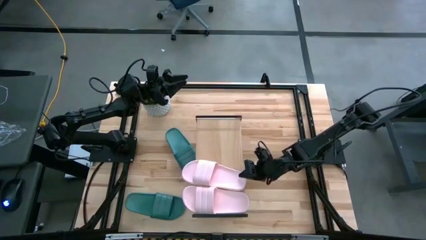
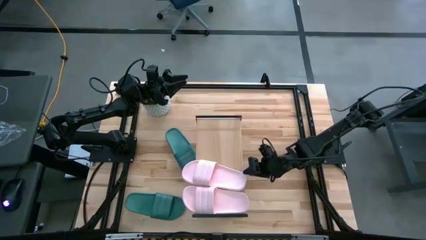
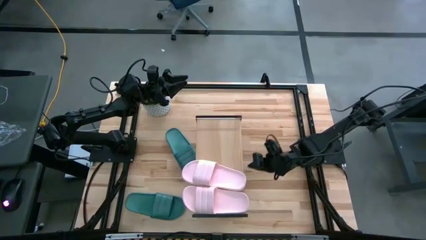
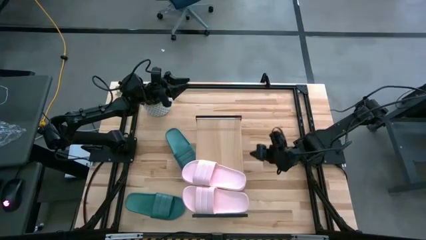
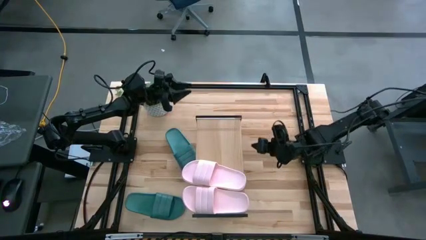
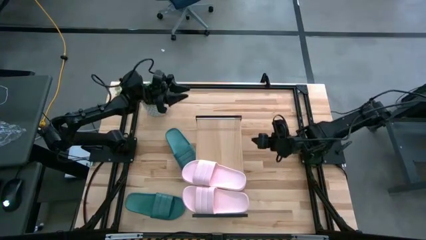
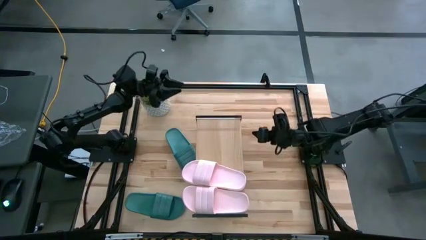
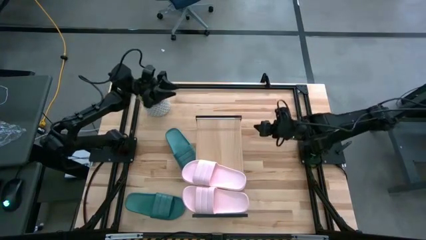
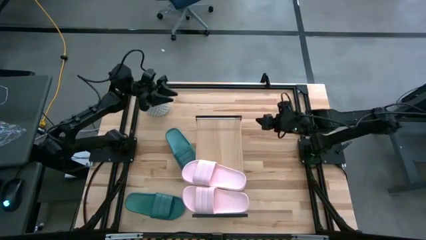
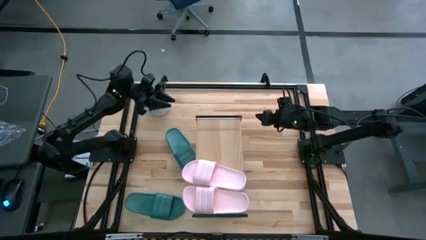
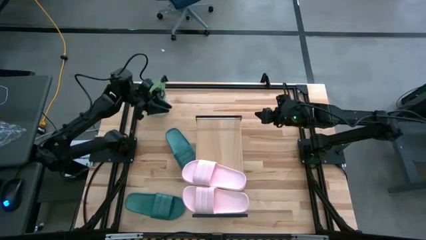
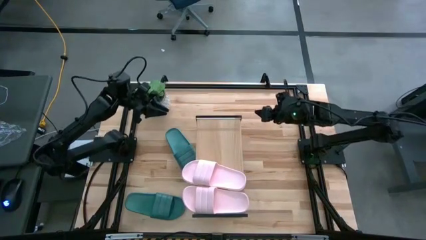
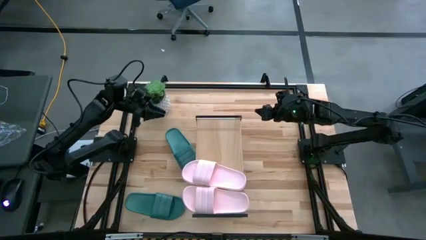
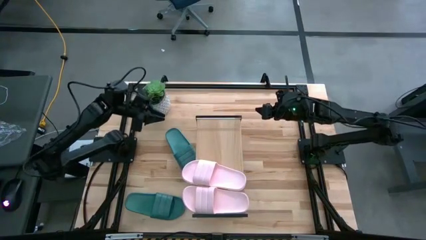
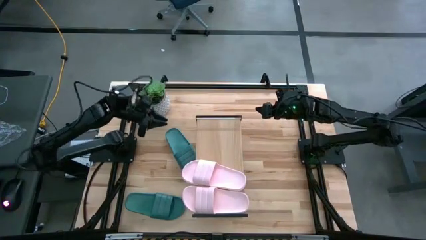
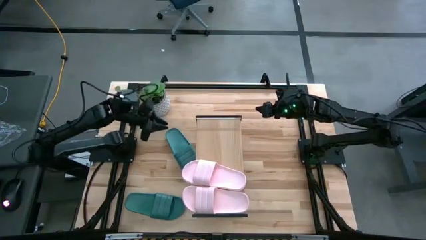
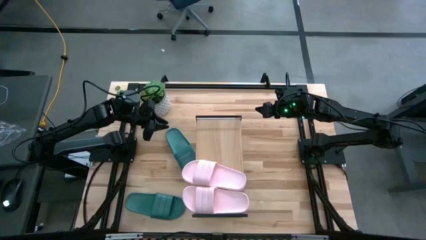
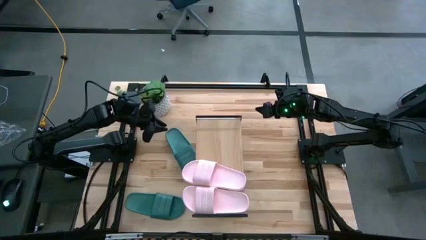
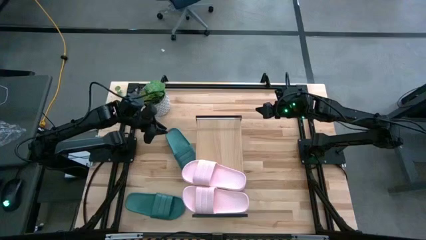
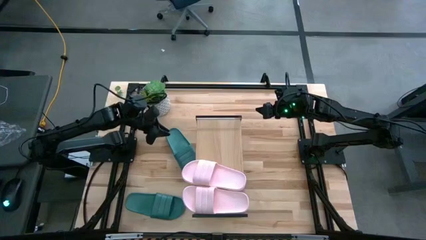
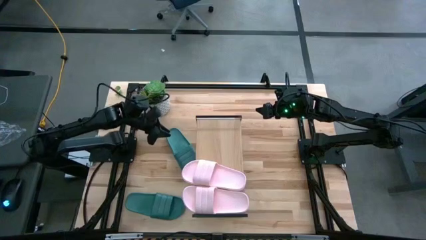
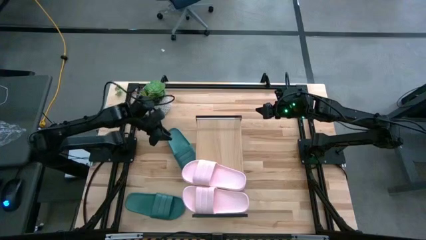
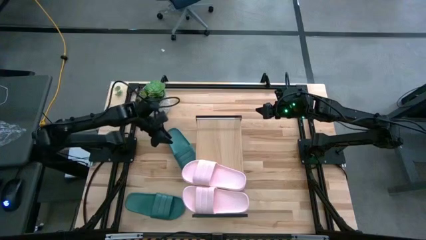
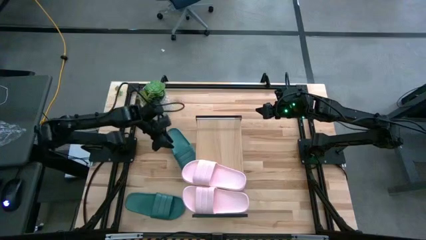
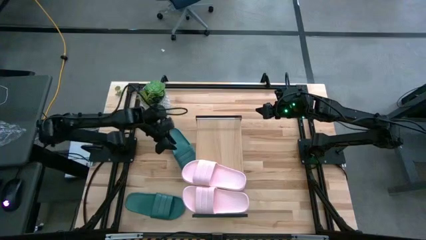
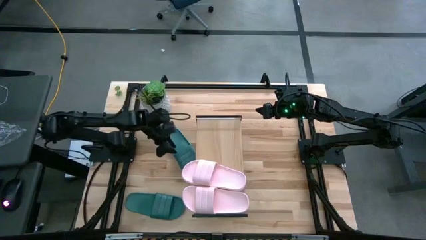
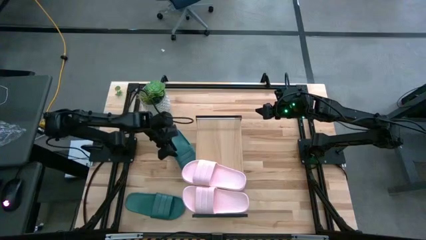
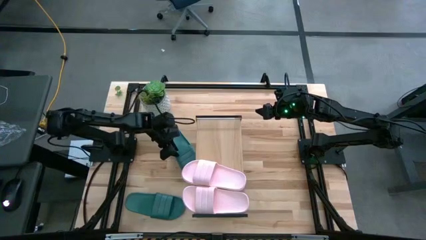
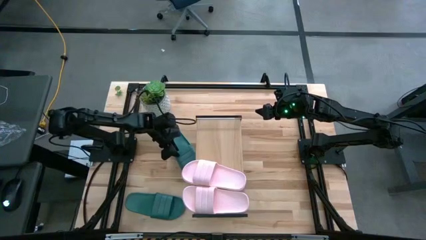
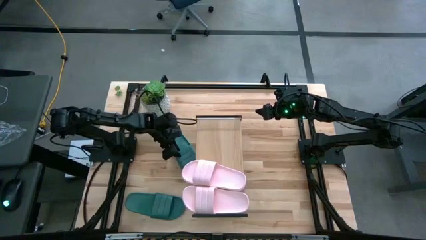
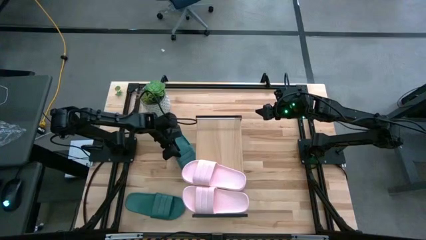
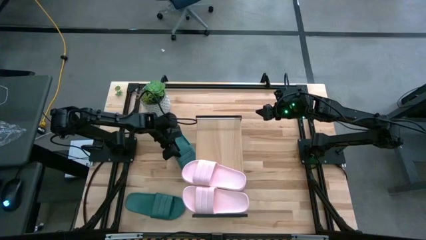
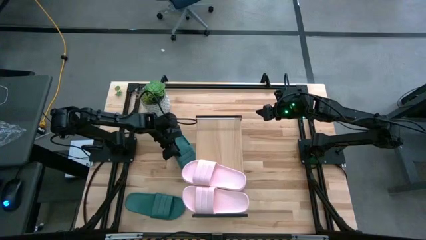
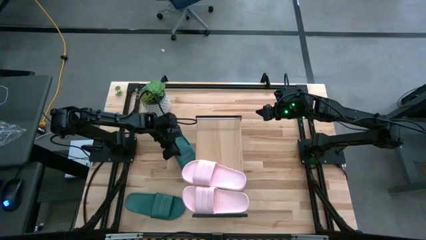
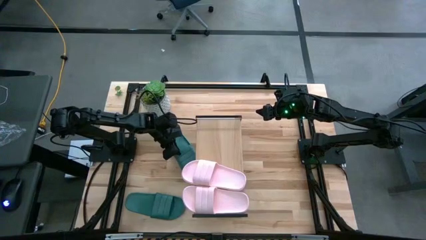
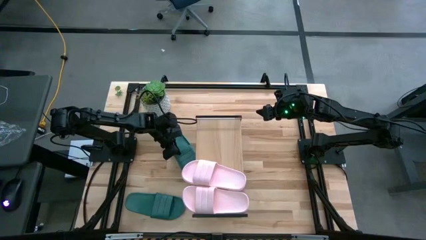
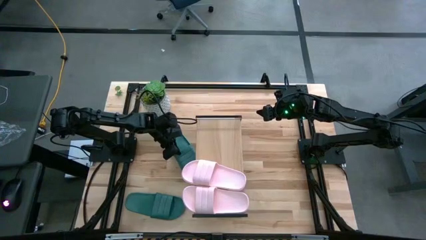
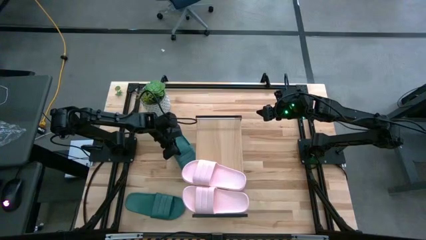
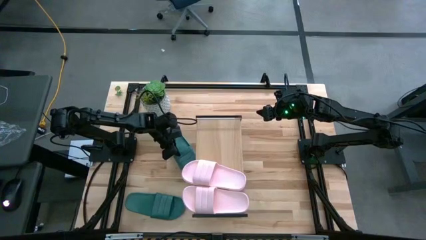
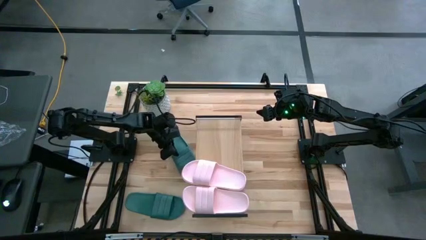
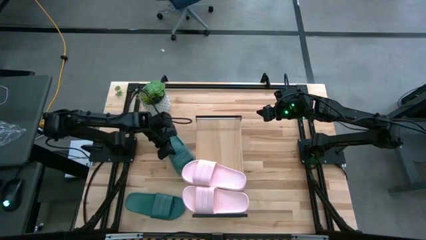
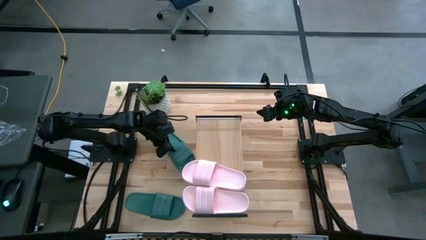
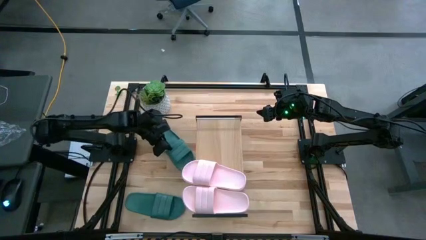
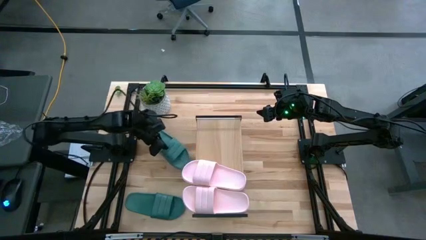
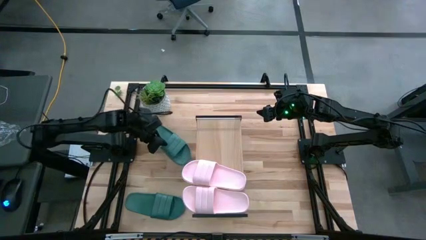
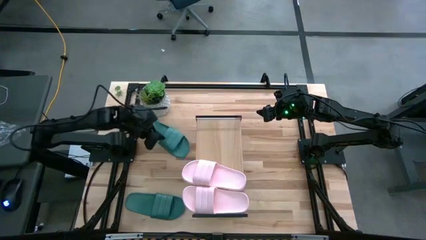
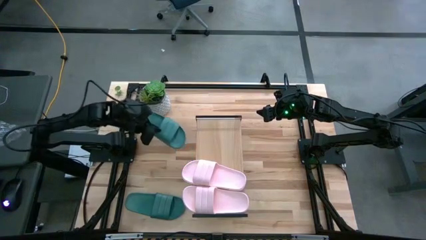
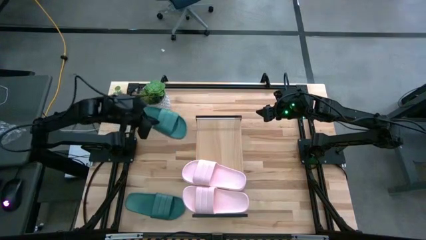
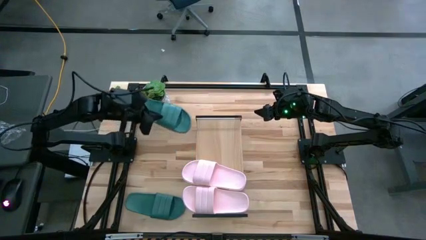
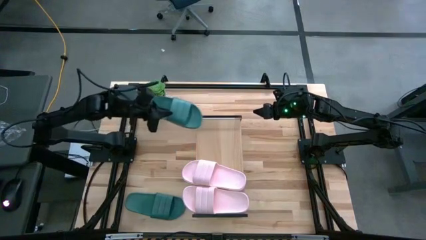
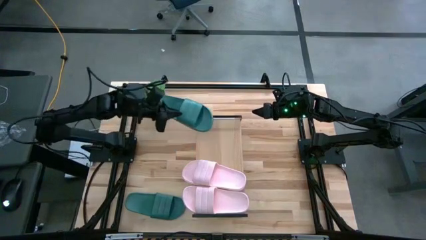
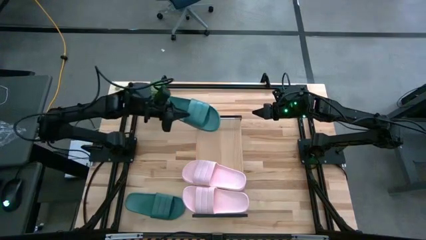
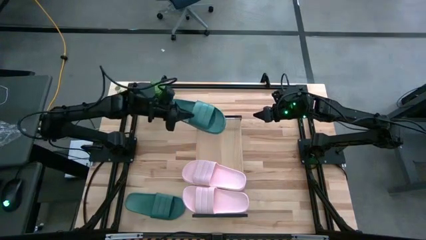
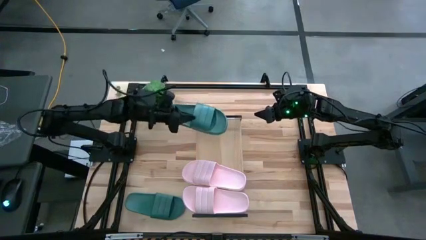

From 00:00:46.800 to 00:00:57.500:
Task: Pick and place slides into the shelf
Put the top green slides on the shelf
